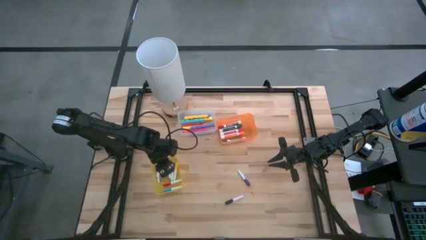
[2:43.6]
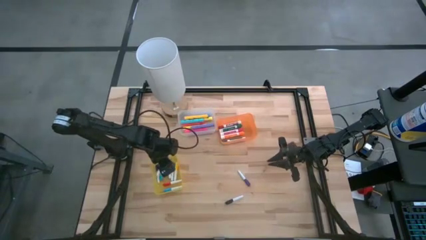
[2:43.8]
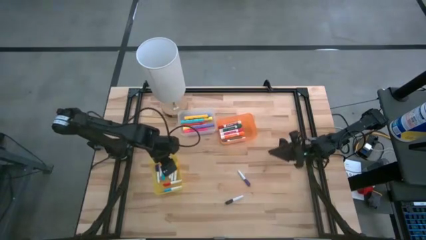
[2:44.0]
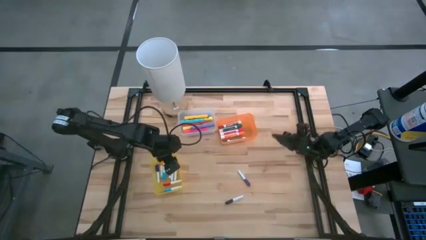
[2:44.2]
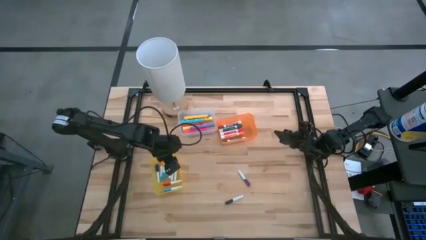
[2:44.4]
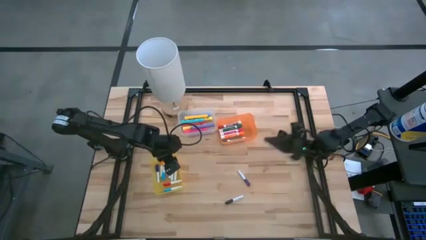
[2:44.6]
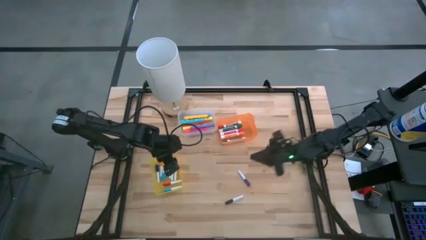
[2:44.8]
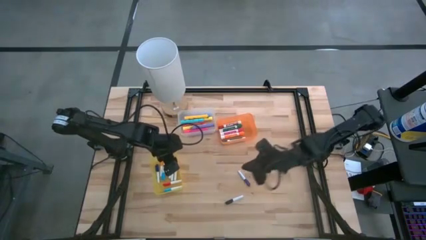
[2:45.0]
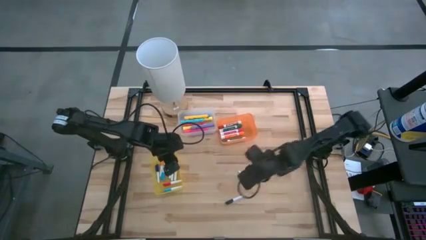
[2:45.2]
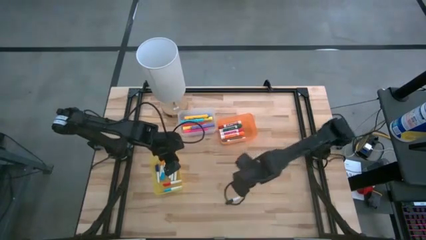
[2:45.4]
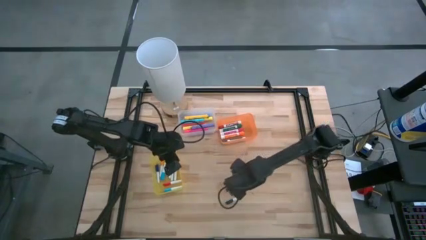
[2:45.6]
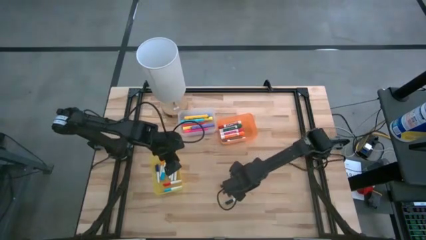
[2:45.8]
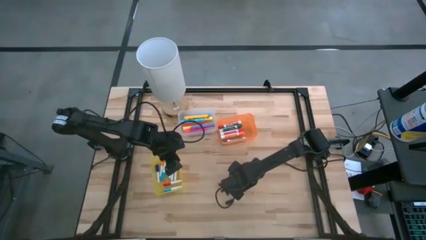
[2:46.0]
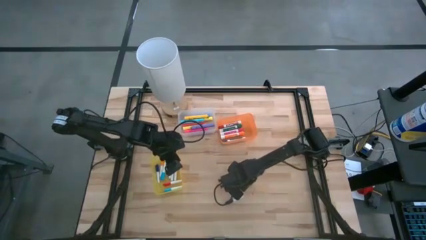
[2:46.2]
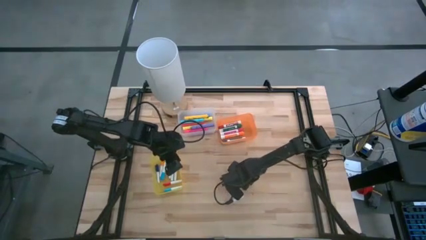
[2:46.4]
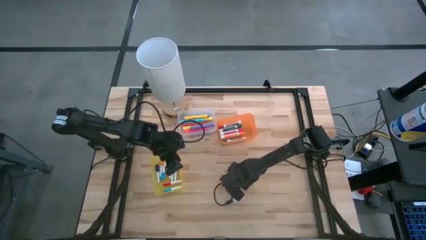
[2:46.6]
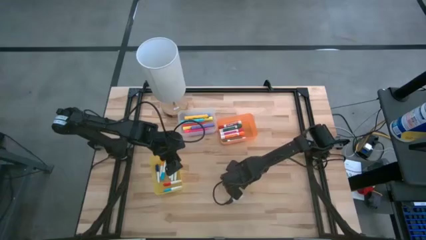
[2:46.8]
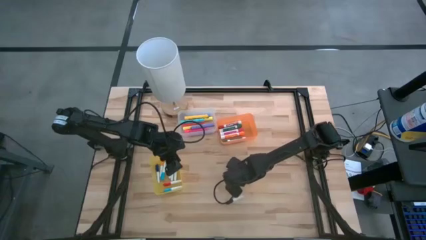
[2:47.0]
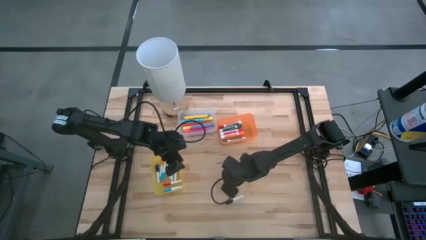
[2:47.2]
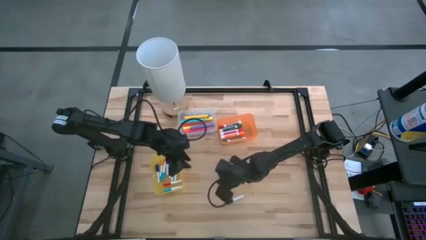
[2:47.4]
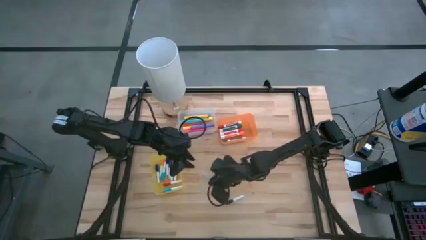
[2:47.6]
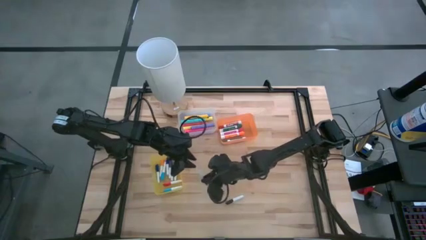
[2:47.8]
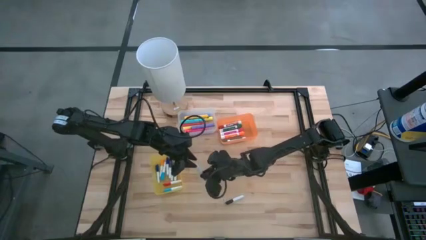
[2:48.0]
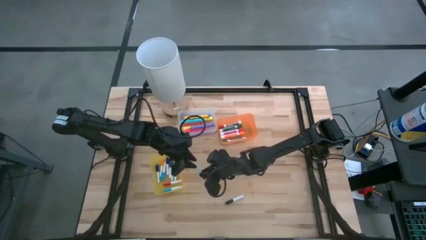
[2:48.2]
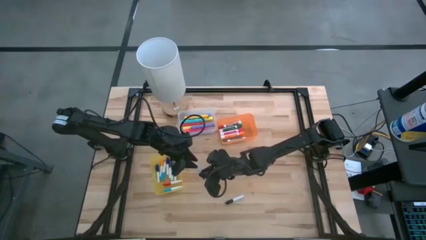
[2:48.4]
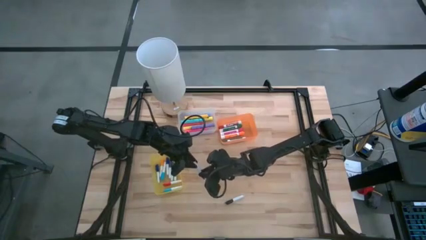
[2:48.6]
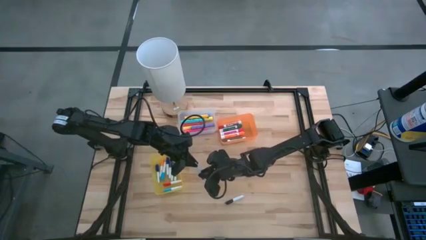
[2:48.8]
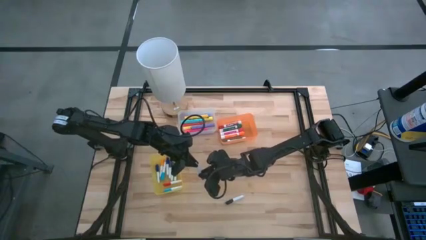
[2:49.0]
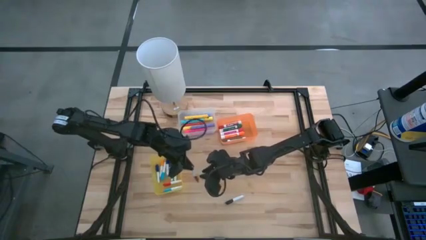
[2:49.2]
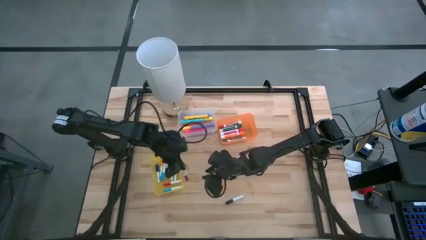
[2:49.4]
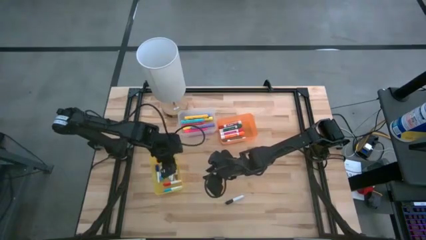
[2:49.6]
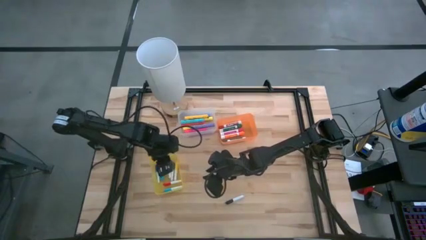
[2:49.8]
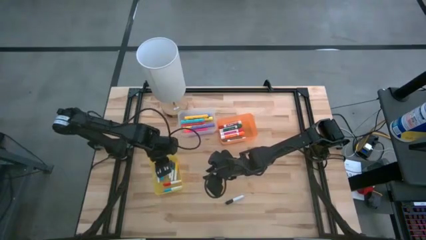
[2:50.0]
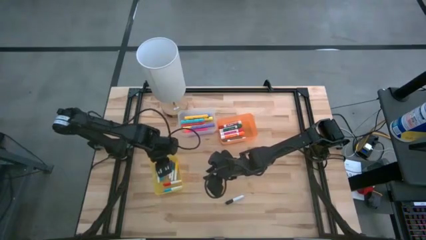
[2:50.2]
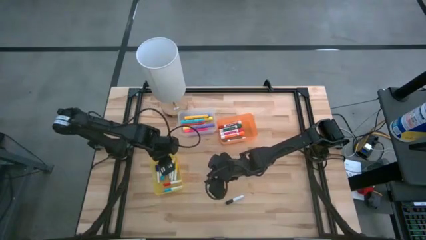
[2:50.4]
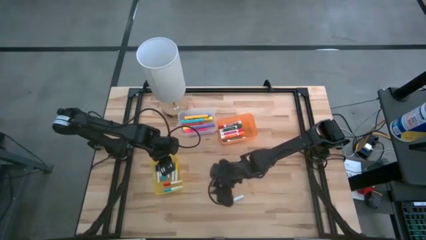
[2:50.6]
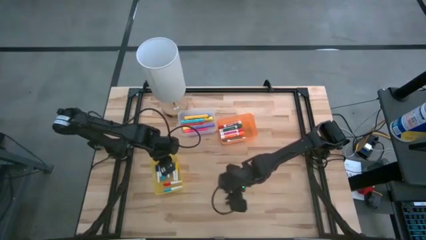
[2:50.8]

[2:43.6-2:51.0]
Task: Pick & Place Markers
Put the purple pen into the yellow bin

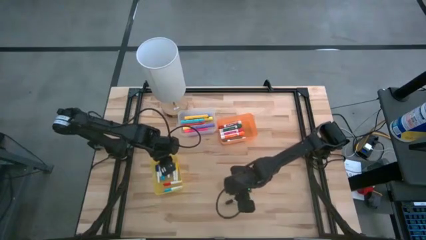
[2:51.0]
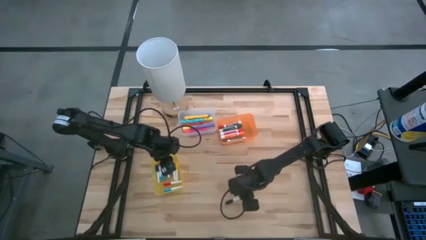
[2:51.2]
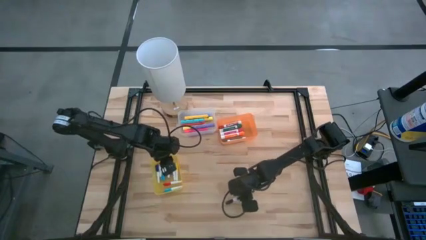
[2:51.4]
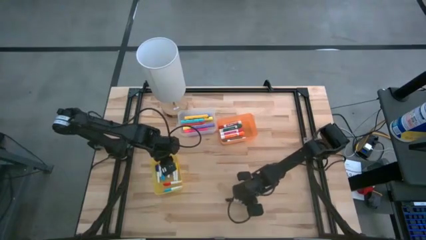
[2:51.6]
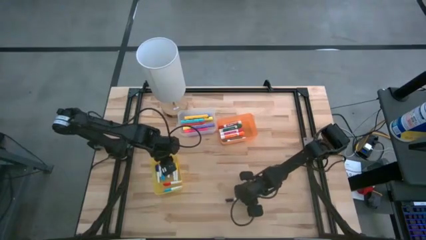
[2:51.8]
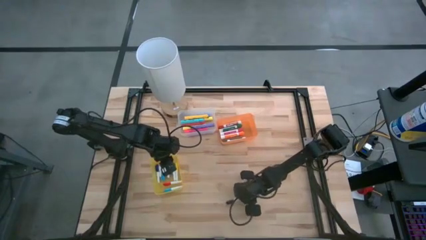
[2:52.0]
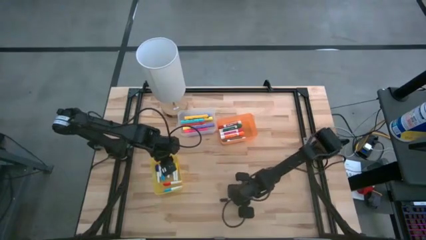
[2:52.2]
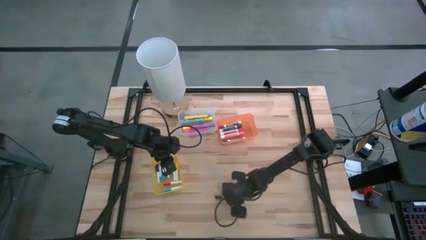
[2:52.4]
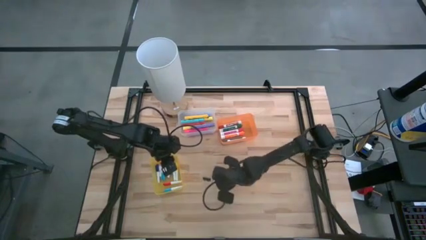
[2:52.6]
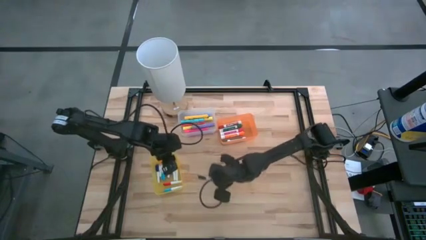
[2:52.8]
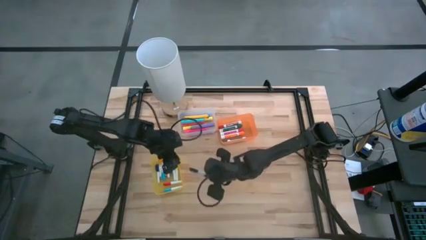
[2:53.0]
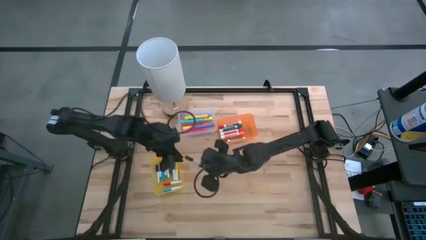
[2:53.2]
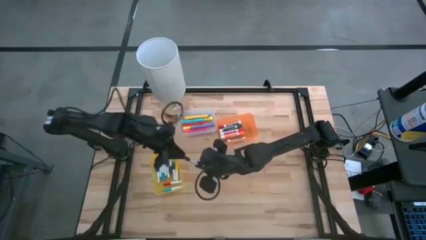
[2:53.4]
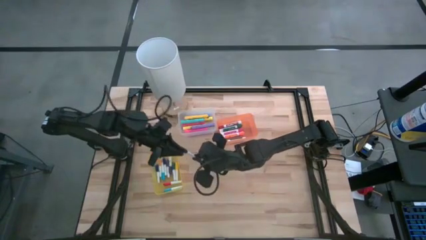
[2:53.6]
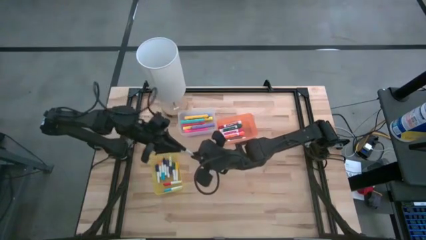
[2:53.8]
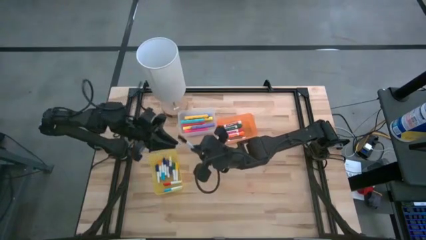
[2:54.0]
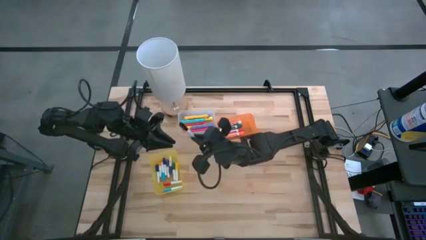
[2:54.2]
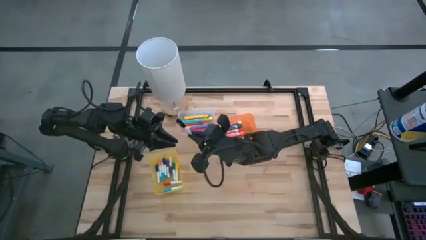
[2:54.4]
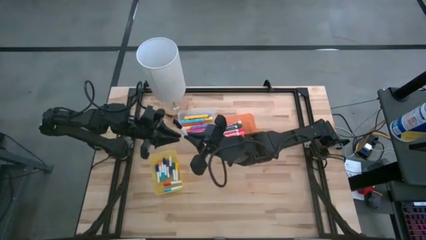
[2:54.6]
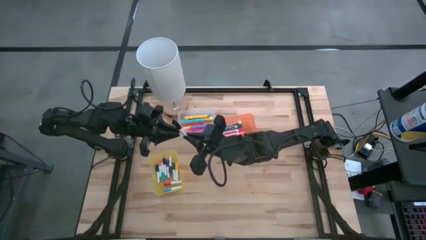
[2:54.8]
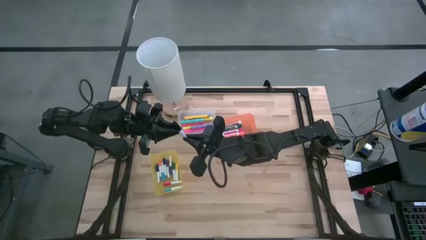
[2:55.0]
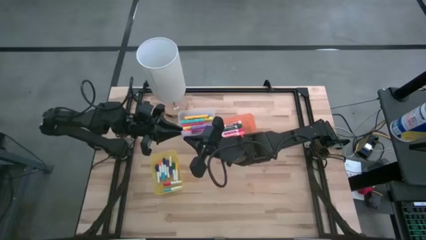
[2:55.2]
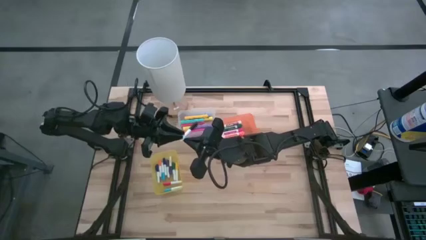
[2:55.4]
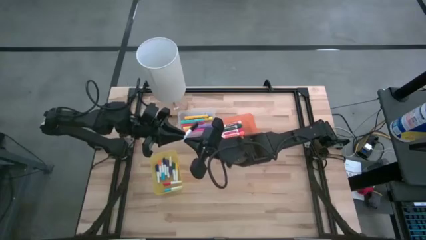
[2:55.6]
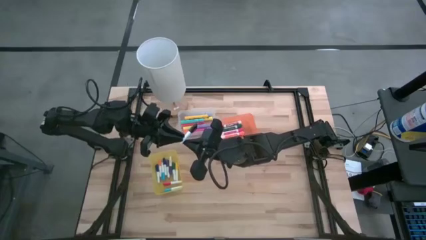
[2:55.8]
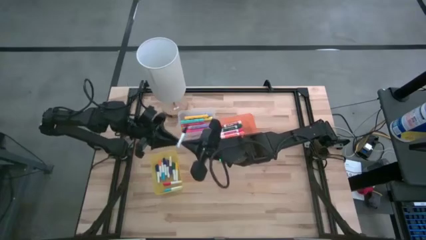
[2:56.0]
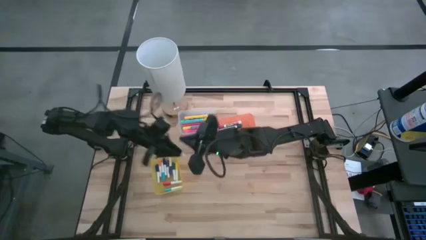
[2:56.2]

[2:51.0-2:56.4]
Put the black pen into the yellow bin

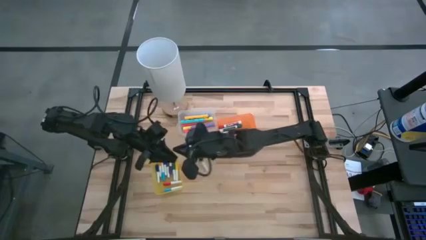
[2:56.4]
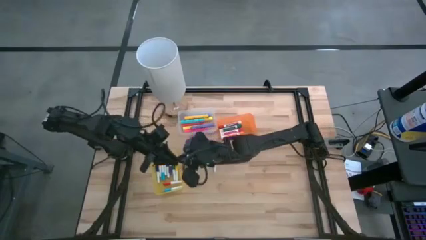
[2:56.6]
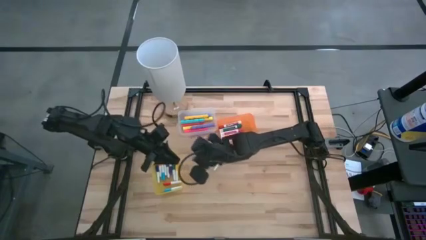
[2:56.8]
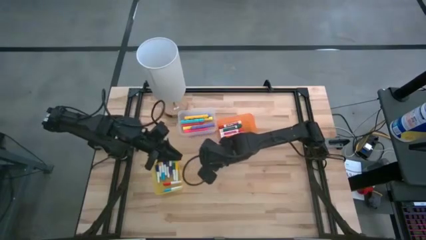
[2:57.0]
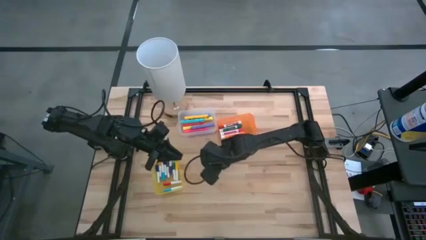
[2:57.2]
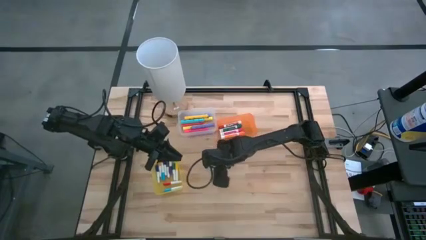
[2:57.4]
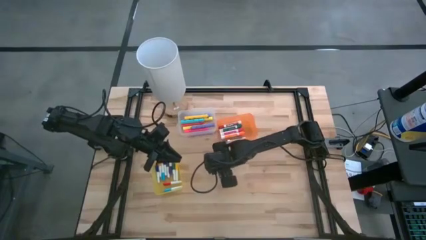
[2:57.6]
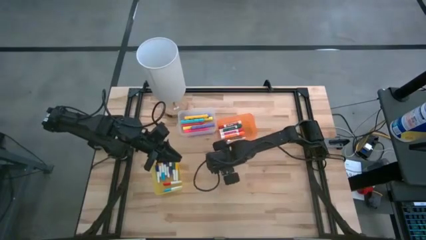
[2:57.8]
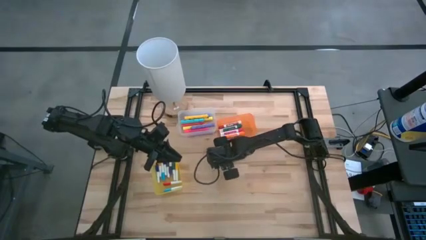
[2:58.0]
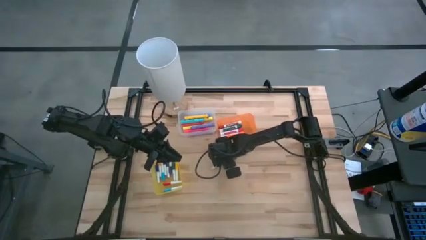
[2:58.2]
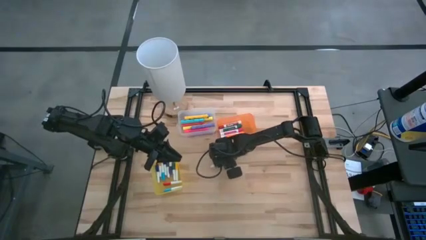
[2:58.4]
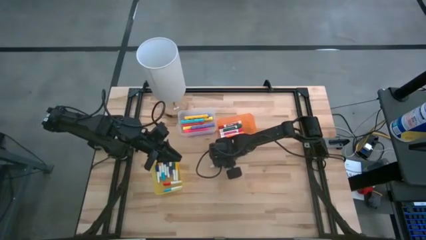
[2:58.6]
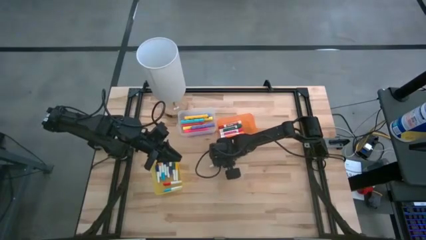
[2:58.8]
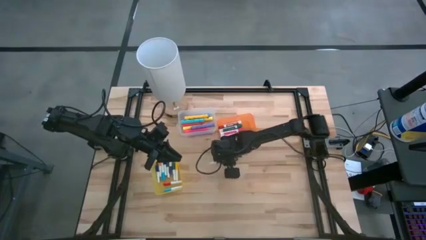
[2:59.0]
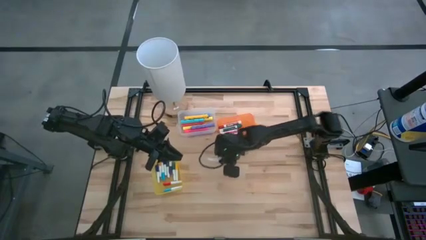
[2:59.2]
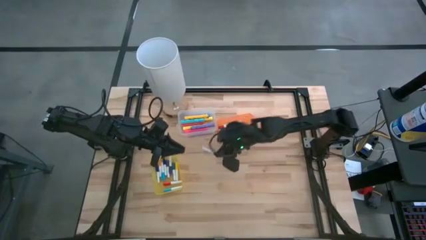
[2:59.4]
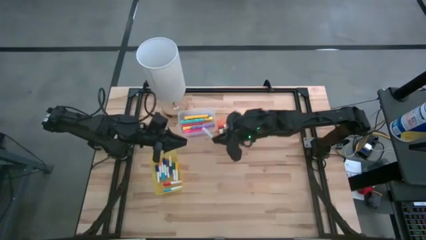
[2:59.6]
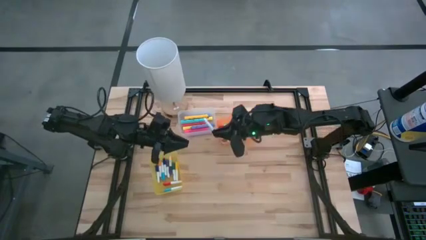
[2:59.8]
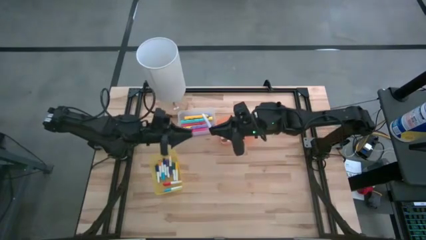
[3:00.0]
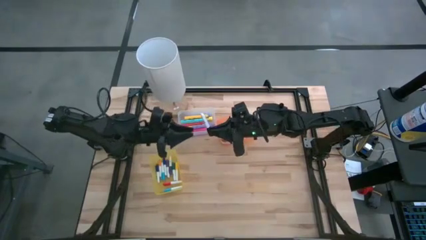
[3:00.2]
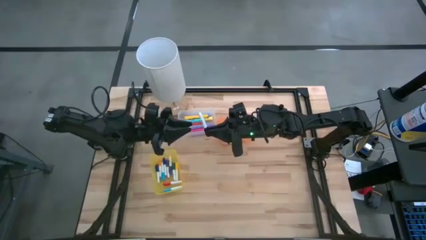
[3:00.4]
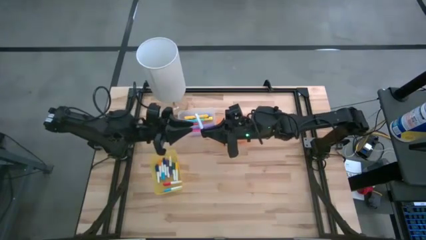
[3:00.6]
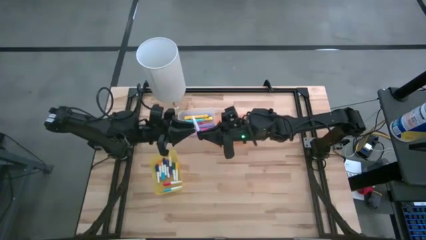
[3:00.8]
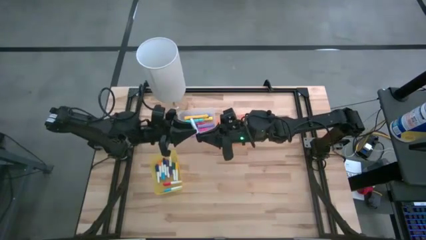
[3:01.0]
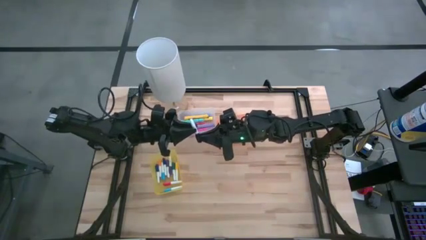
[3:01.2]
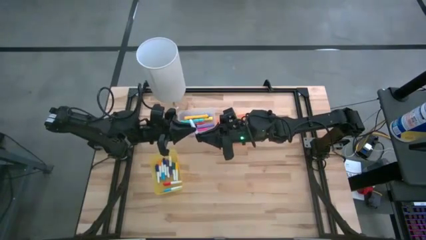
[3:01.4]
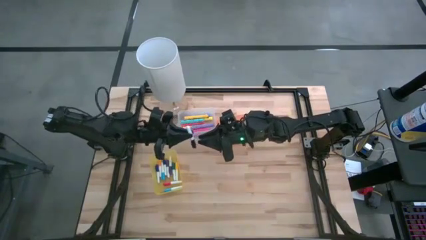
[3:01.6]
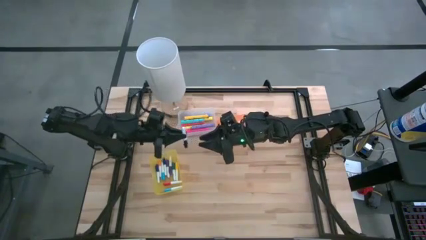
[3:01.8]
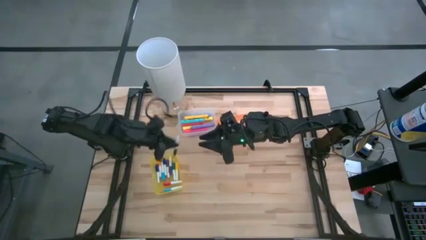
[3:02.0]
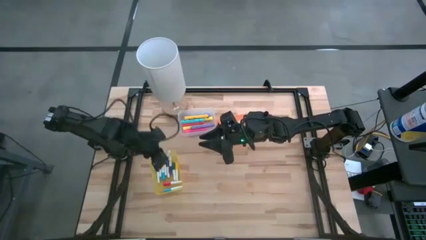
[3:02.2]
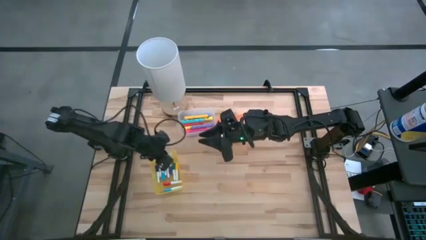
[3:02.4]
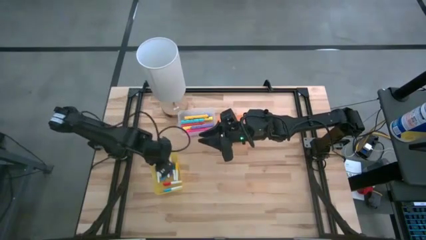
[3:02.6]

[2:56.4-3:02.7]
Put the black pen into the yellow bin
